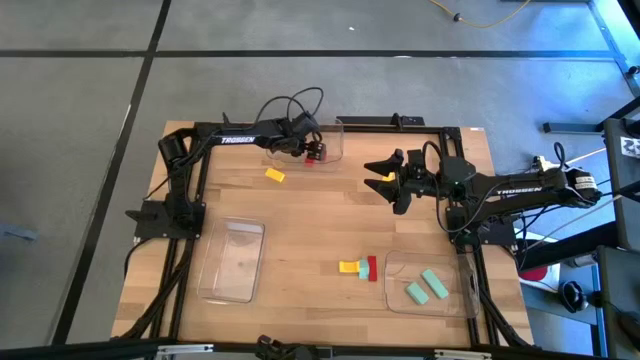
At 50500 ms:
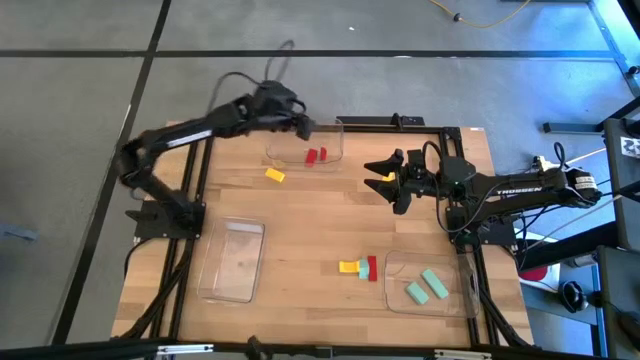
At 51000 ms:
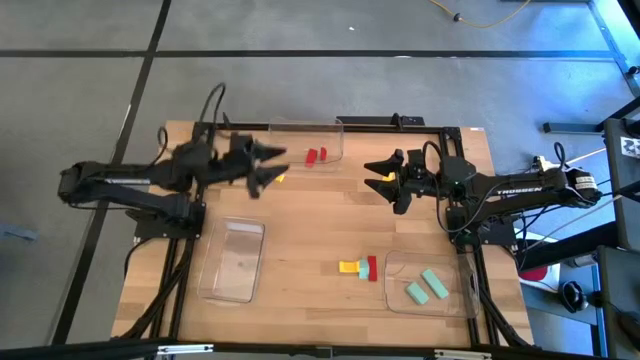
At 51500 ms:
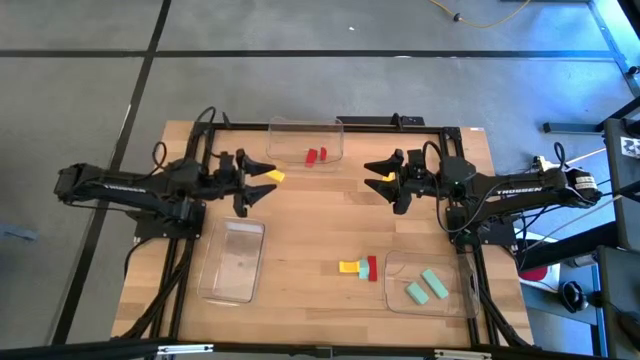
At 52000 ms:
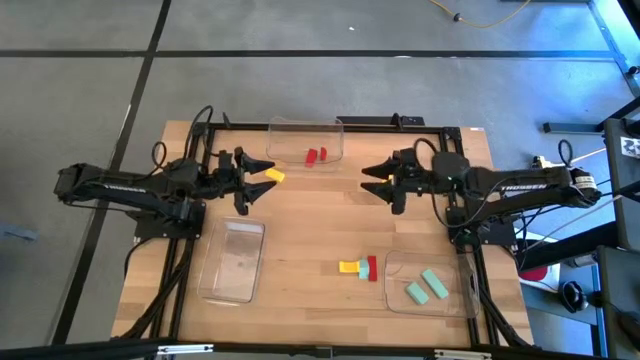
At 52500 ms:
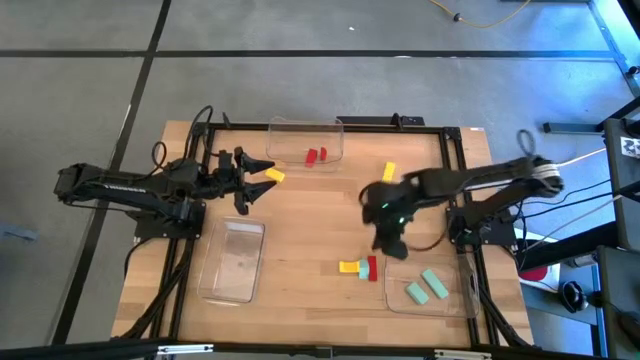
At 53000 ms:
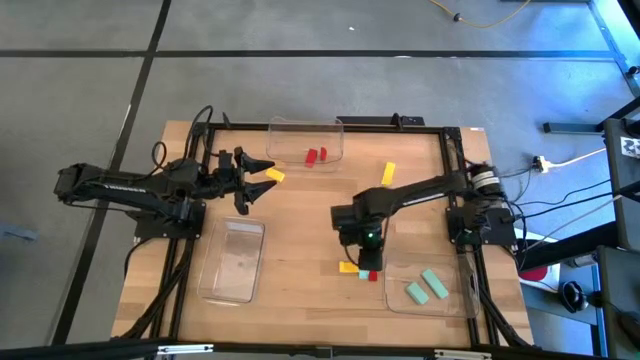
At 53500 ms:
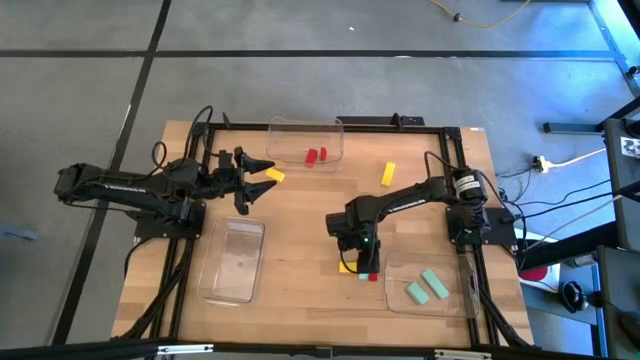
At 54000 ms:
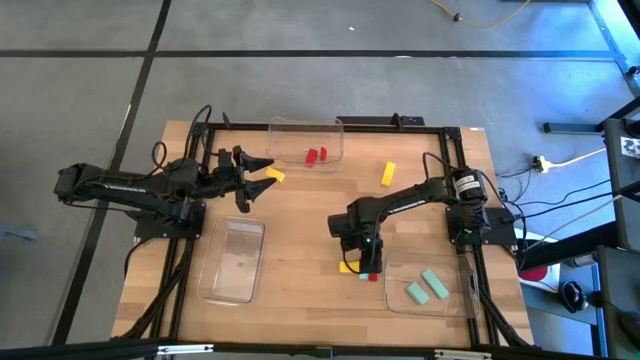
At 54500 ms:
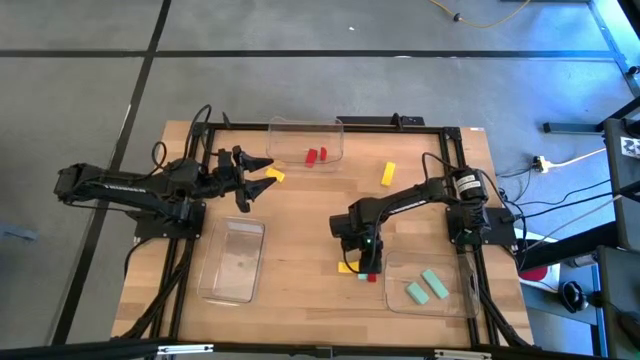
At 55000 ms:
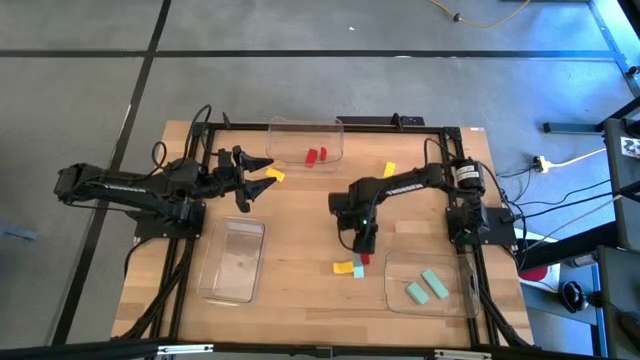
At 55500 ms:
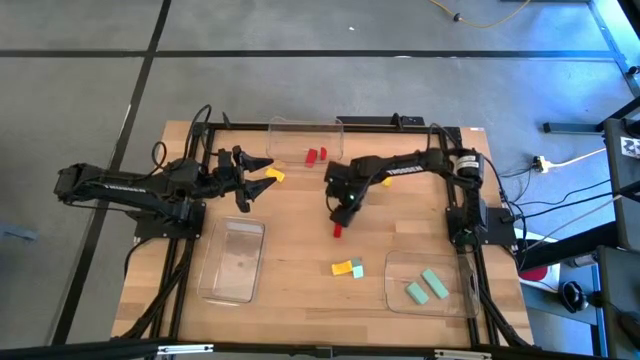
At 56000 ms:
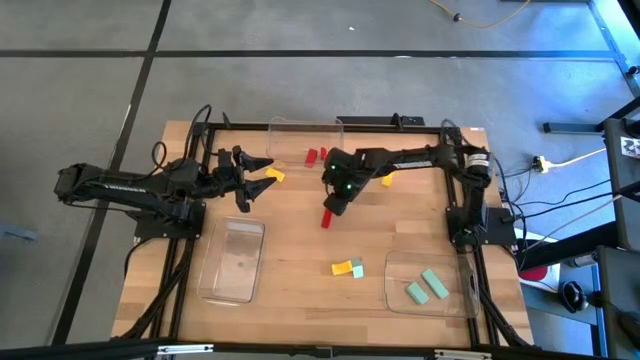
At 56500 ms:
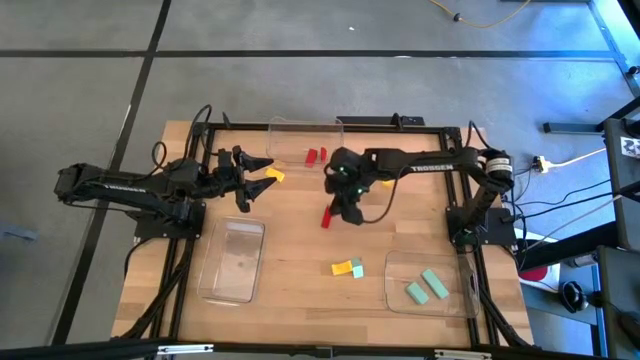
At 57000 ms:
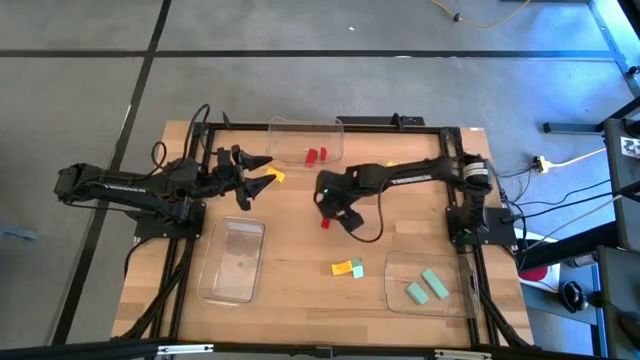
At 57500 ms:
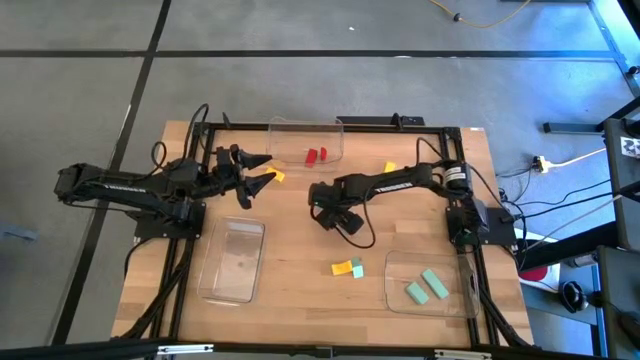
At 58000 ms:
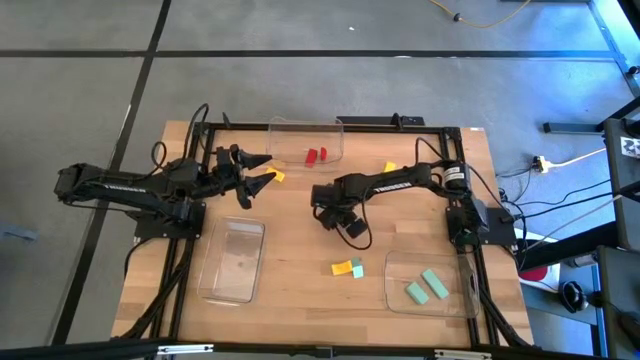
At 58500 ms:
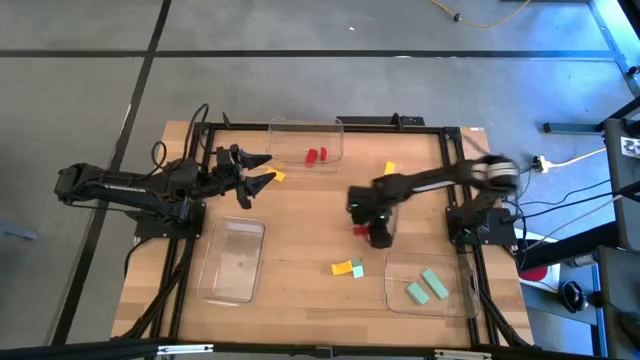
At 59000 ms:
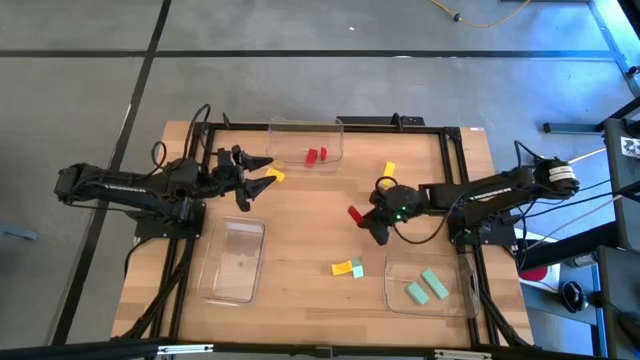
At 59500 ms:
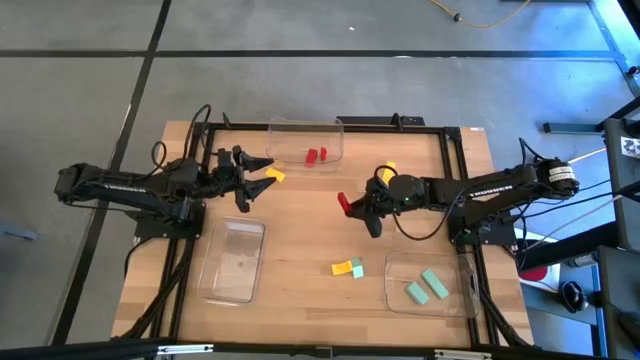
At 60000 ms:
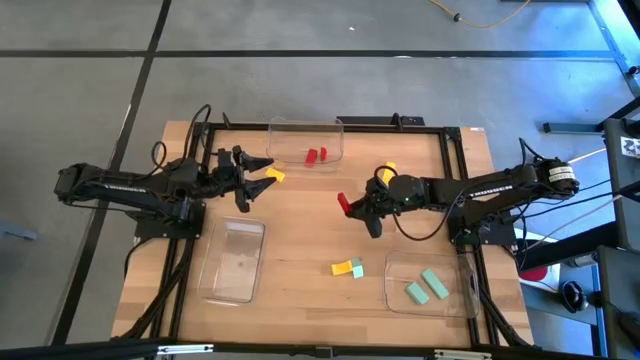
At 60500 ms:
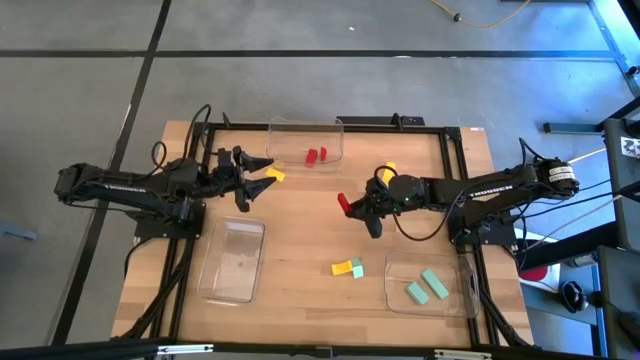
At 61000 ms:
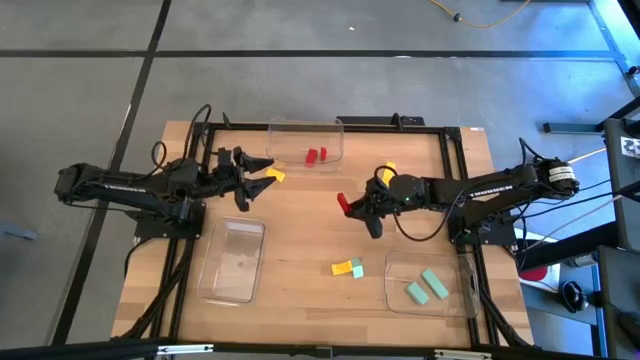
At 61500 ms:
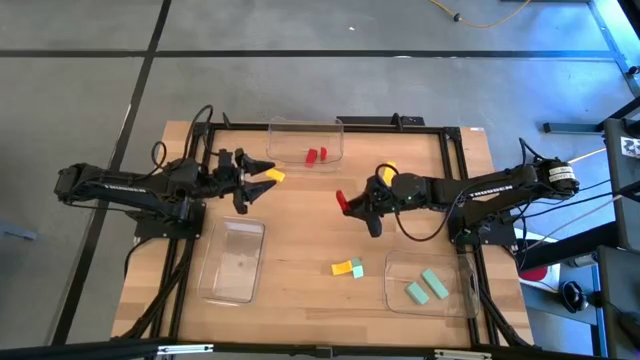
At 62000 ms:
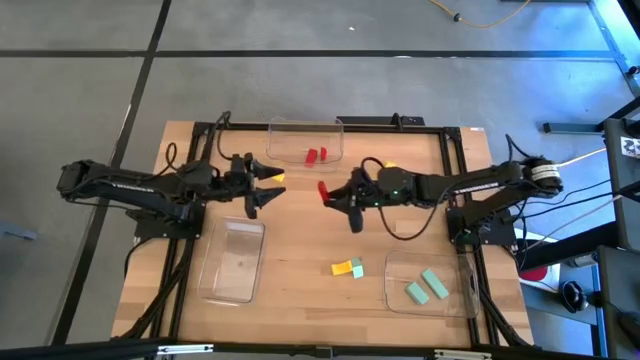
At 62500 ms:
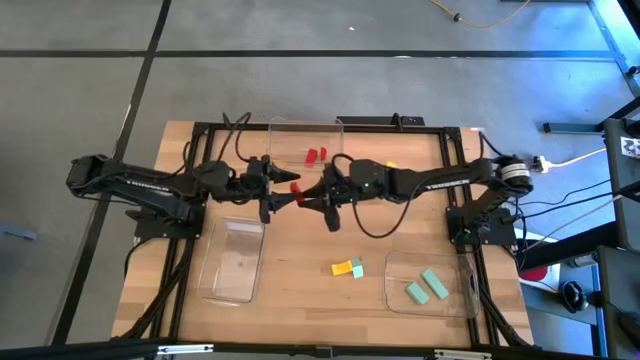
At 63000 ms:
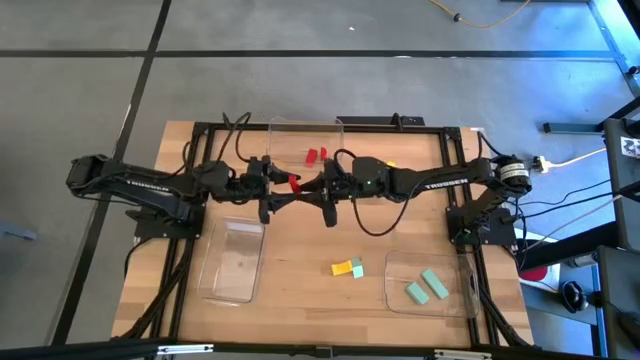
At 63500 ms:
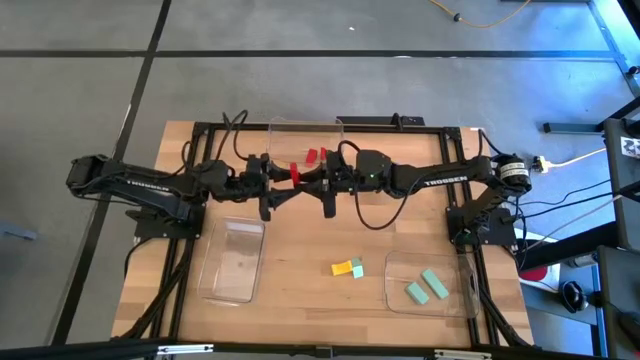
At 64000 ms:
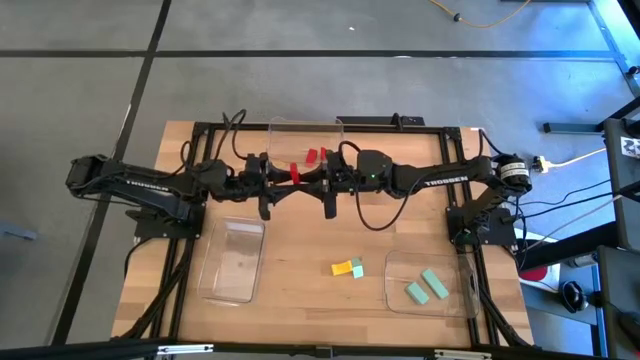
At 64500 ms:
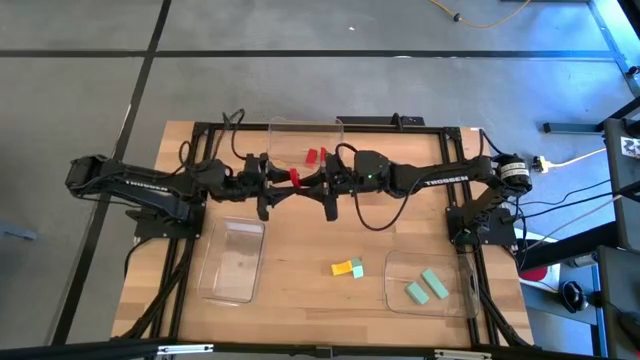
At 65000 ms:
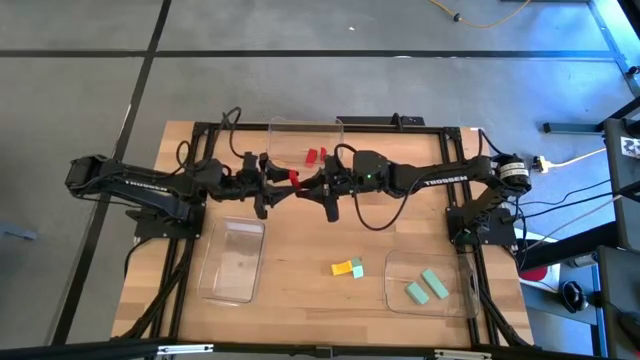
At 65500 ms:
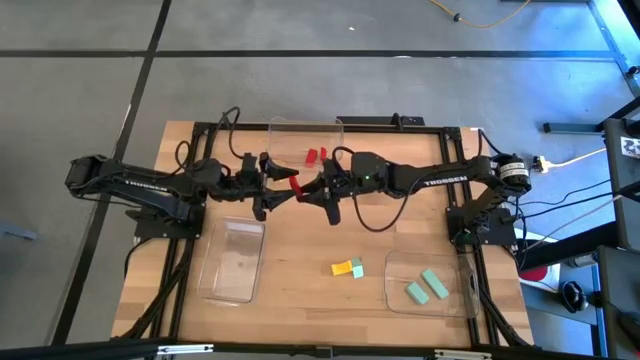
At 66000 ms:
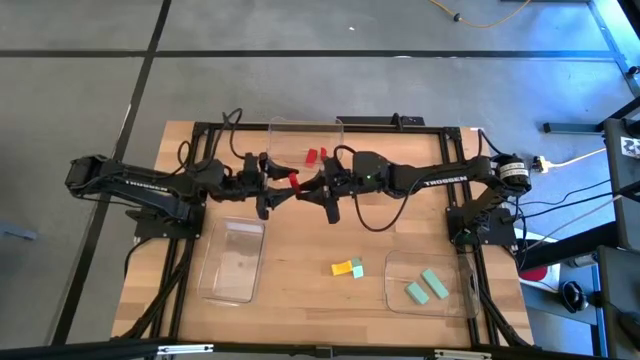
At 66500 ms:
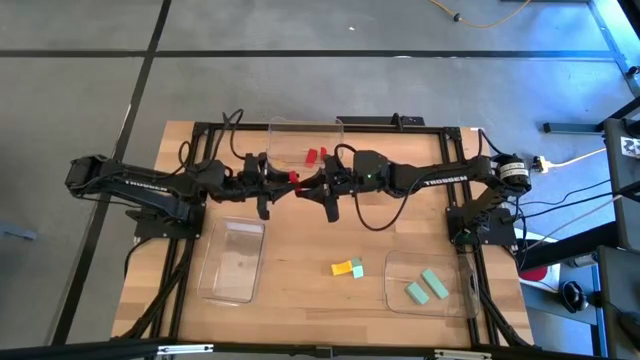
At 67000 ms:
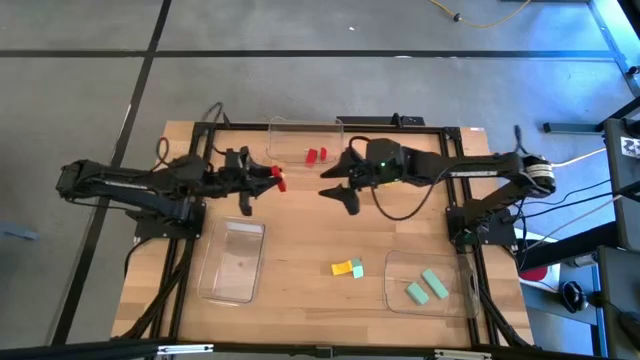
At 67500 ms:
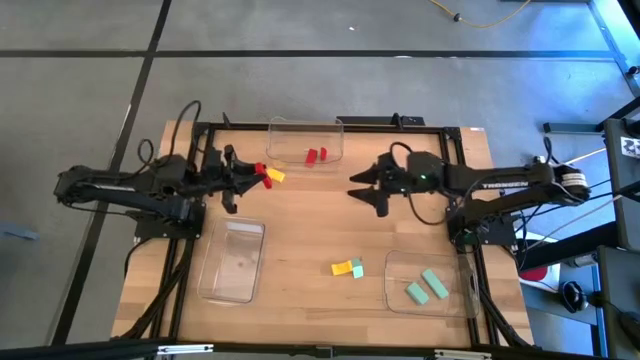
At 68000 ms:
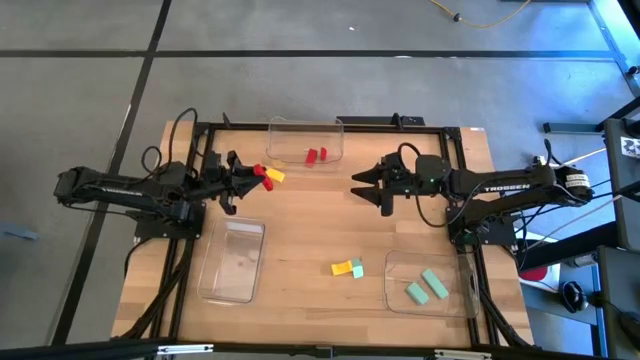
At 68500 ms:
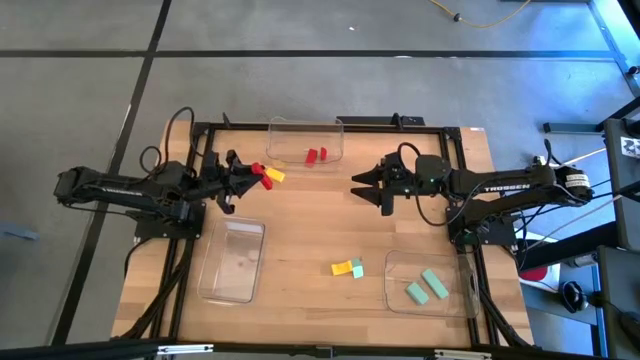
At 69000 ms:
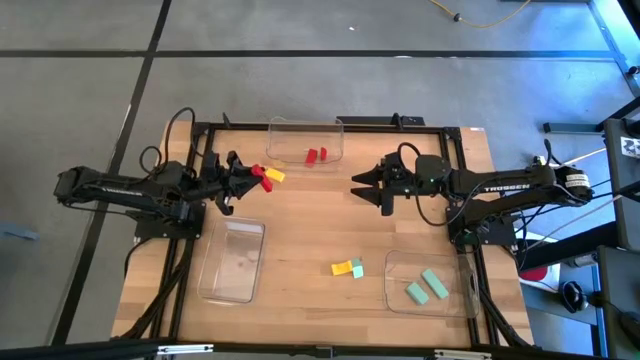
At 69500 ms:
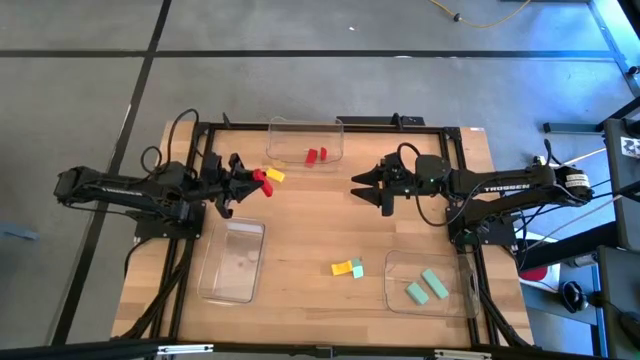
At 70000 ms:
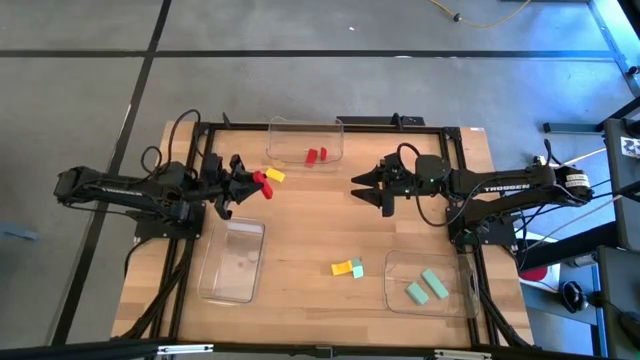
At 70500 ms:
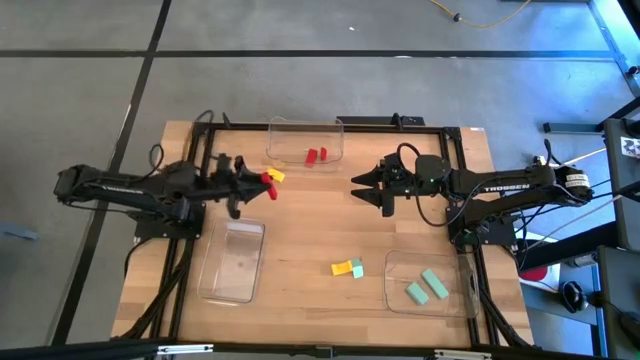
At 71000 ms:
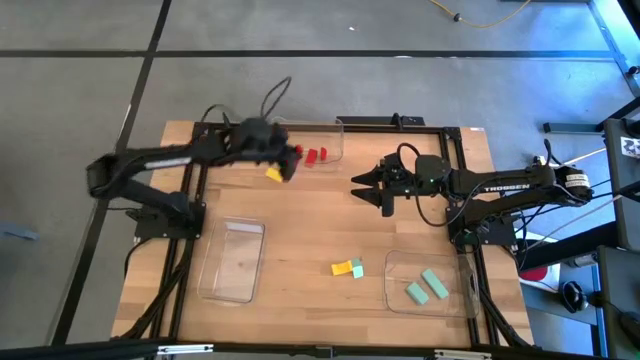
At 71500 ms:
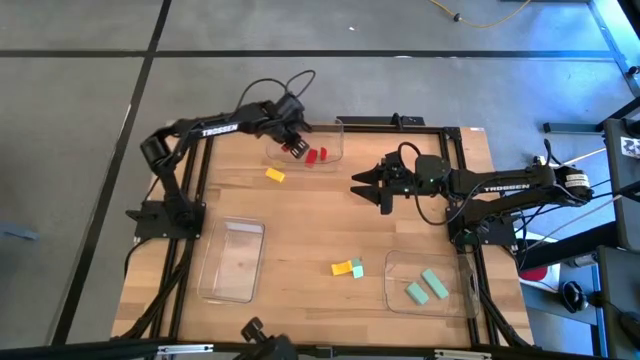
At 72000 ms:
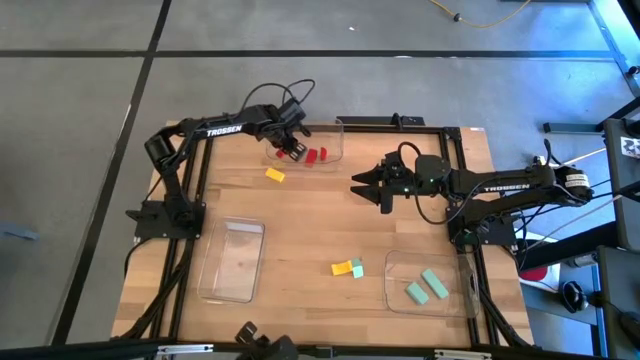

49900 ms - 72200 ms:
Task: Sort & place blocks by color
Put the red block on the top transparent bin
